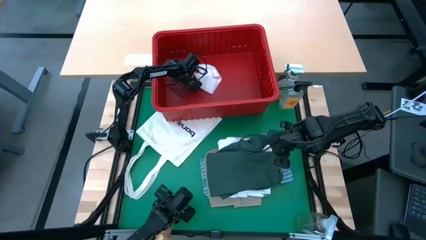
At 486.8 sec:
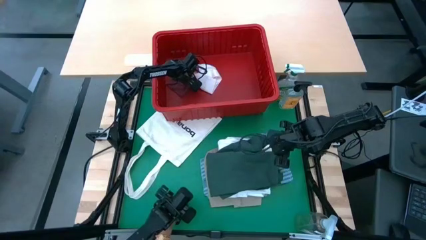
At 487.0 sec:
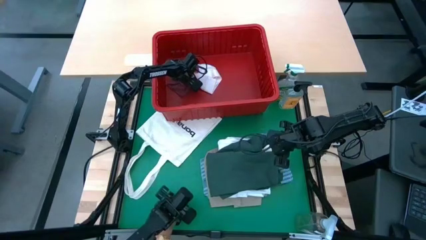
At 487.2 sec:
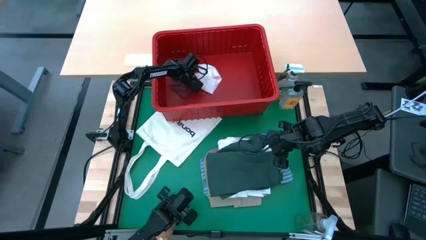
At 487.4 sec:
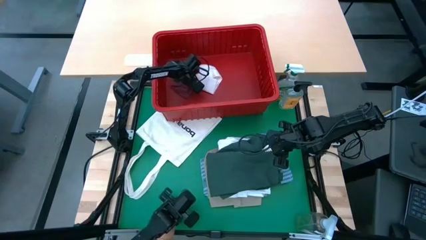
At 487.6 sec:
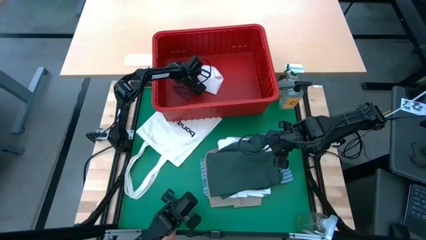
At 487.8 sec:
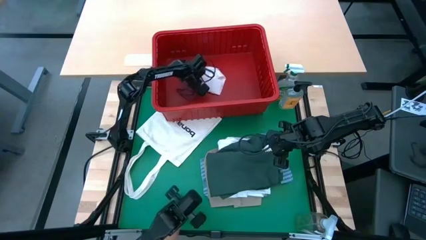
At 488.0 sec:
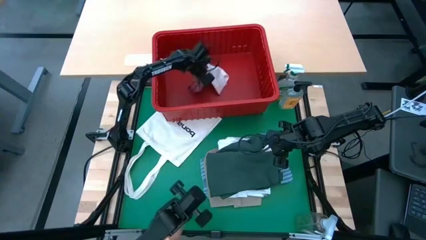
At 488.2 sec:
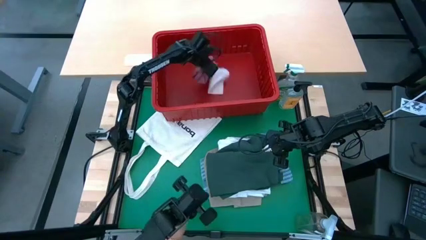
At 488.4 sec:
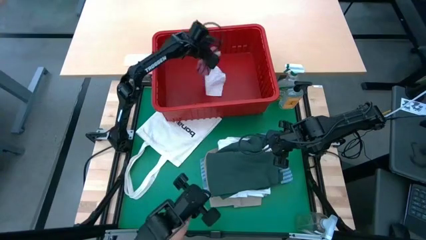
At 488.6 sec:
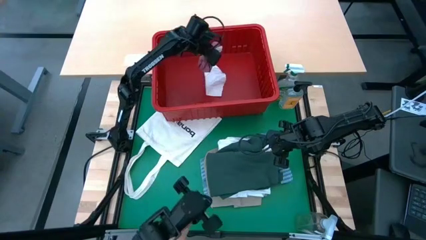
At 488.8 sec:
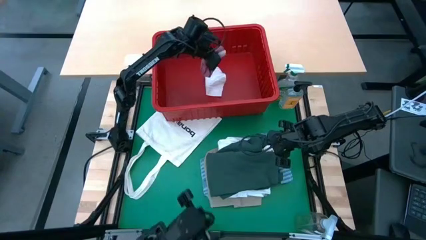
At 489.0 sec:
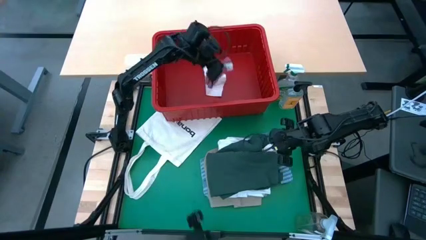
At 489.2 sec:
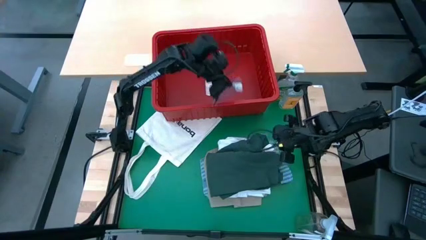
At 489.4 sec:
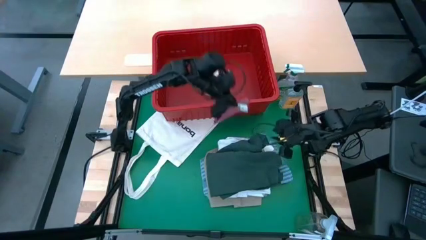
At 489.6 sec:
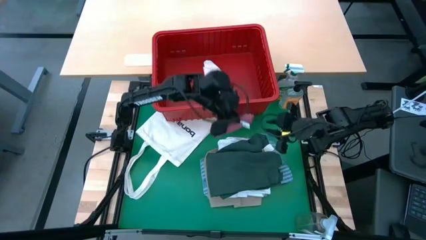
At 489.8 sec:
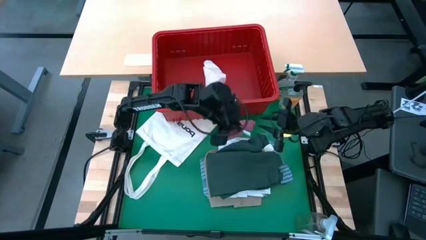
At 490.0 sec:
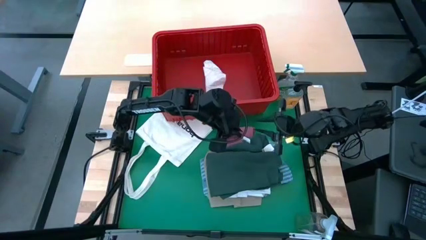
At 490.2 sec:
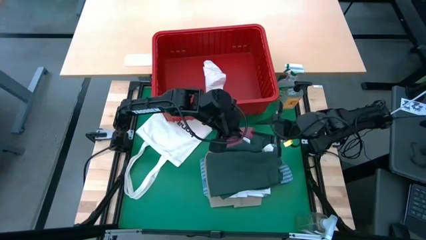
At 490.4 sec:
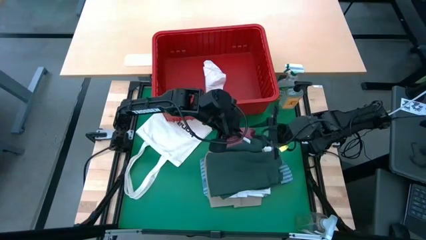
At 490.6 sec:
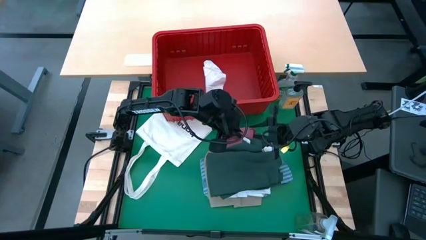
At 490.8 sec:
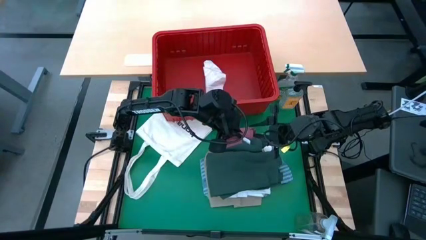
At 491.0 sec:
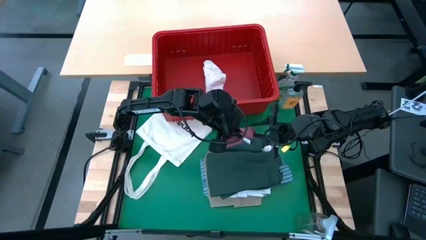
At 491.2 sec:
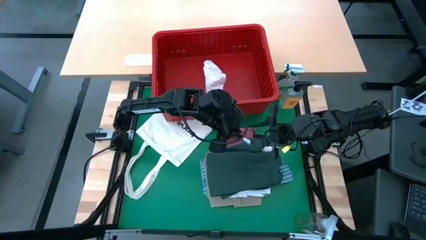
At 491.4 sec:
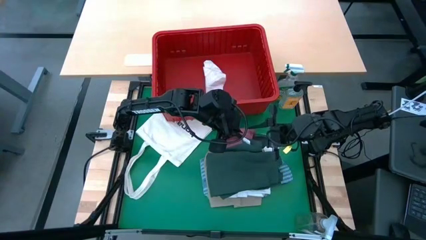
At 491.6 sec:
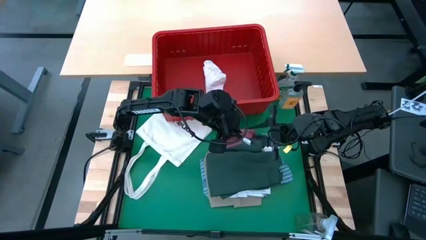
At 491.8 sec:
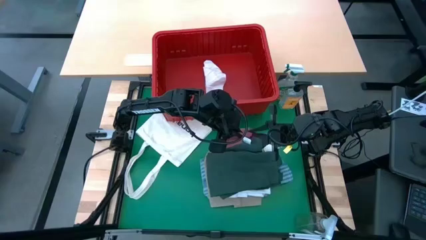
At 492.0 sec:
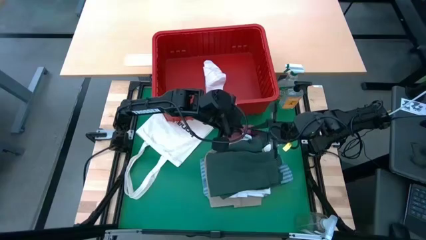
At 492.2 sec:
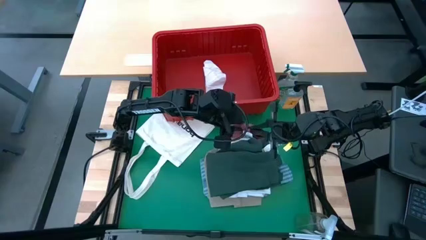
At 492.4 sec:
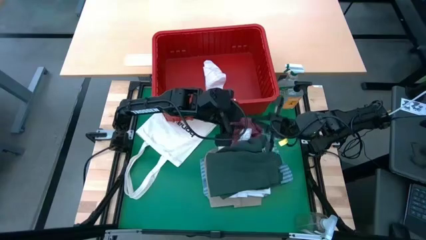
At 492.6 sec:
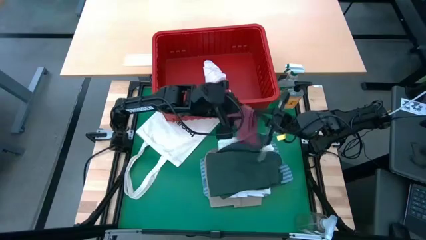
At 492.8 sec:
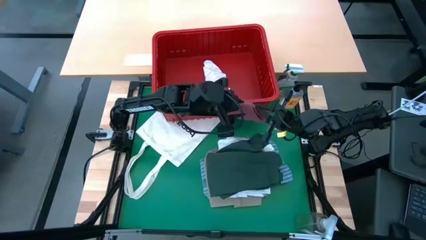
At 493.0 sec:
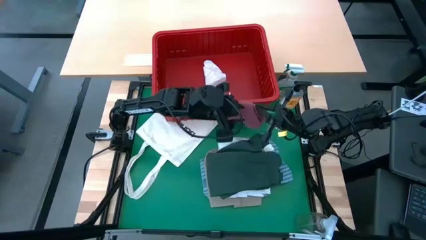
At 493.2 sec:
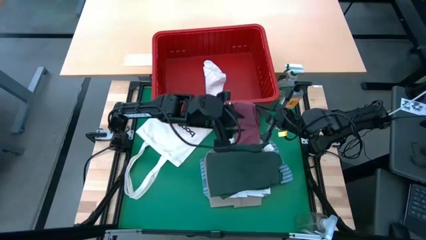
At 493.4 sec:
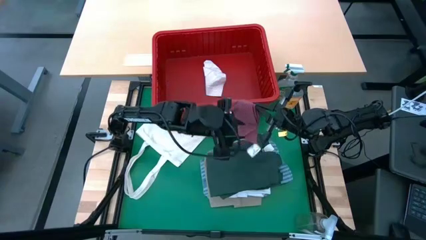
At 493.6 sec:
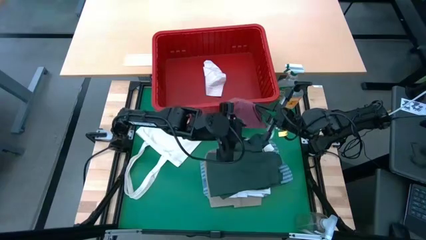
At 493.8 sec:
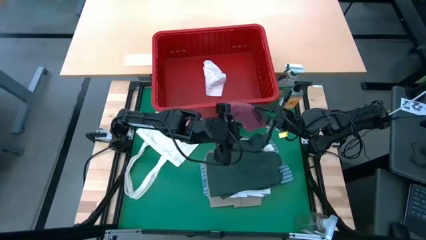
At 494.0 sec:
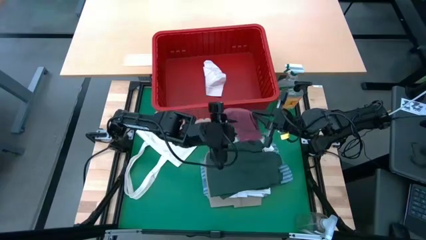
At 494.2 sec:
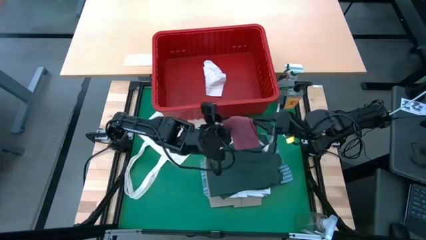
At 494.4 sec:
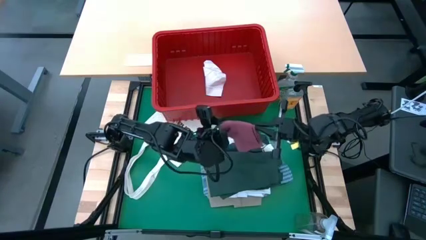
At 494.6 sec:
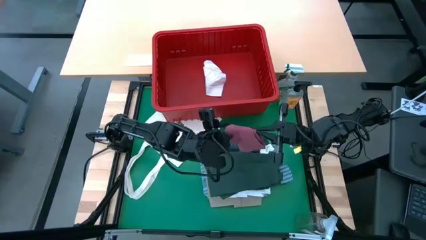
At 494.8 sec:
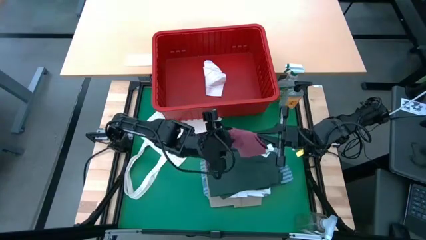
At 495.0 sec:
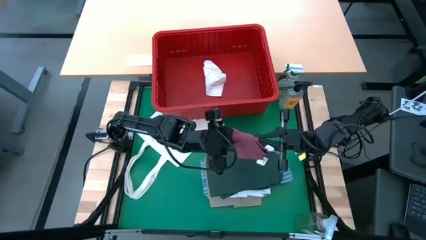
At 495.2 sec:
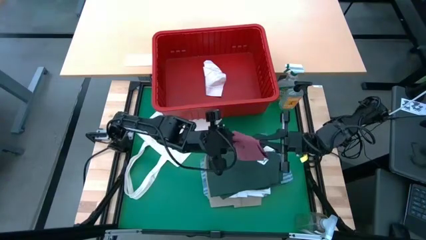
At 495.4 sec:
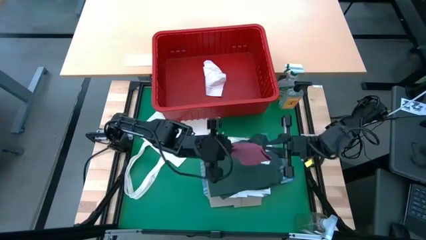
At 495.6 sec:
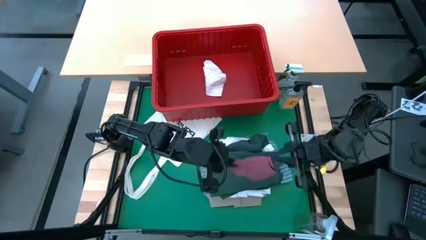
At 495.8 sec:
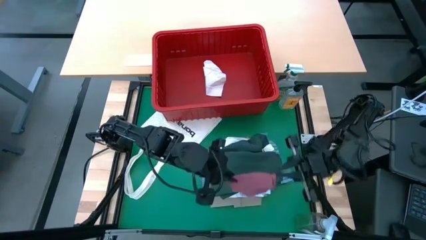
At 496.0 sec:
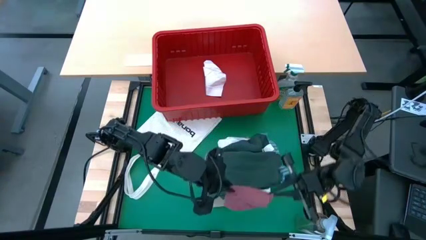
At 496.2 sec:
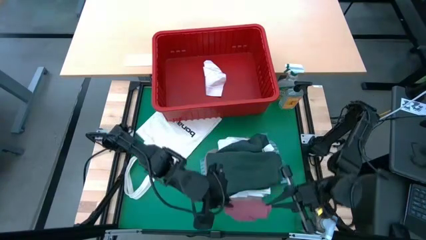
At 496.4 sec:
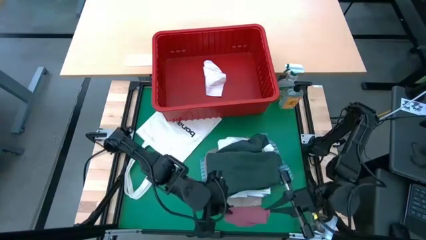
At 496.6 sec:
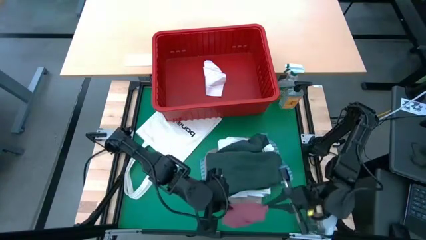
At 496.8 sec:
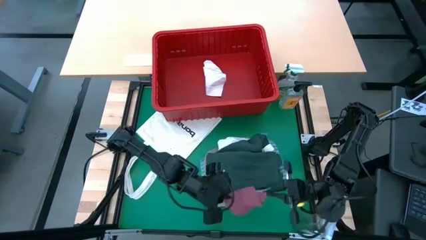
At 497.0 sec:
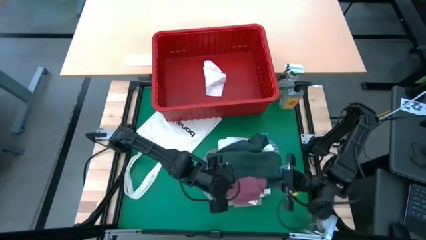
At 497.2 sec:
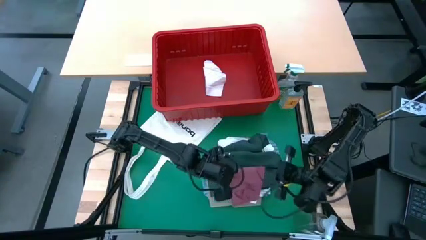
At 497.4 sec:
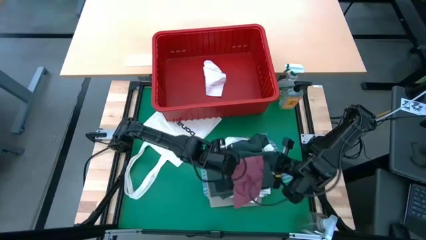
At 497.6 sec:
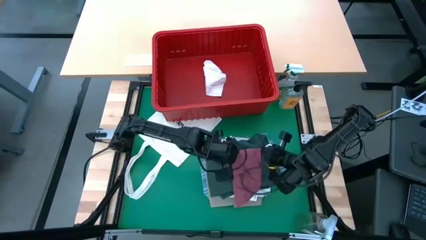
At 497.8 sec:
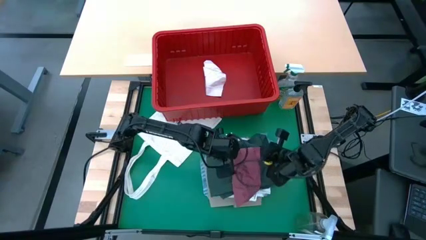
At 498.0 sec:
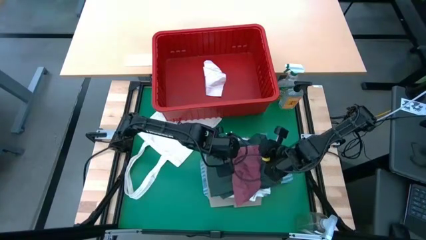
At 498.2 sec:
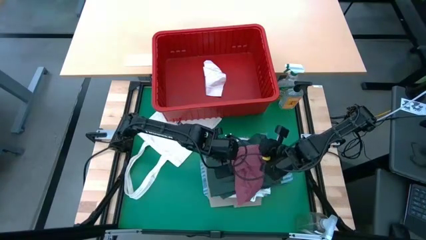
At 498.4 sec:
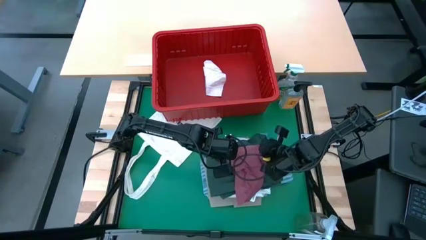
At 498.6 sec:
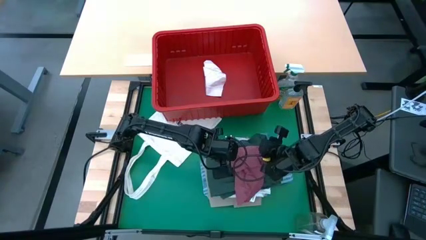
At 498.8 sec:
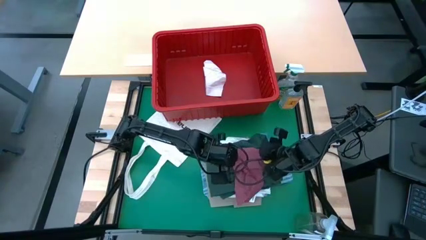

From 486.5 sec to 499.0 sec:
Task: Fold Laundry from Bin
Remove the pink underwear from the red bin
